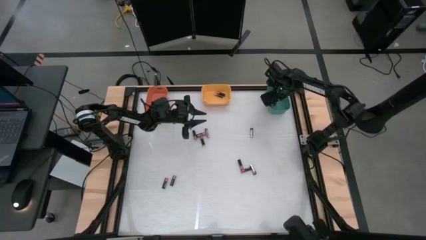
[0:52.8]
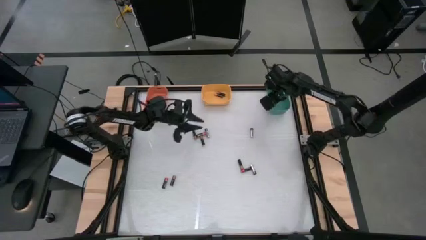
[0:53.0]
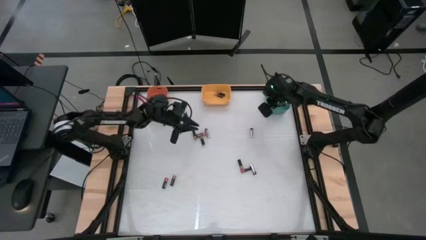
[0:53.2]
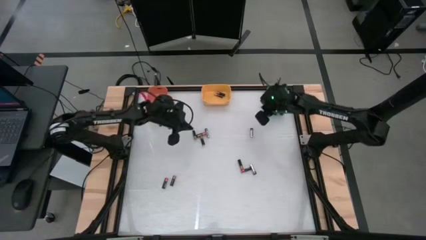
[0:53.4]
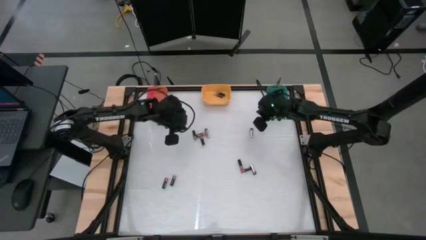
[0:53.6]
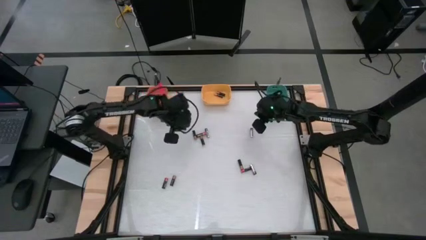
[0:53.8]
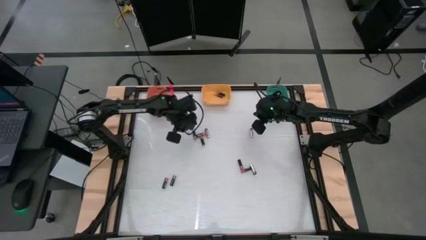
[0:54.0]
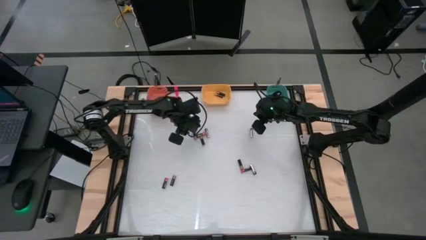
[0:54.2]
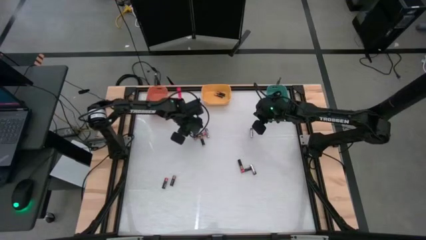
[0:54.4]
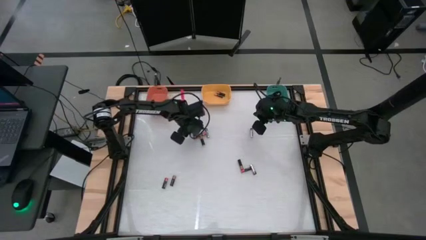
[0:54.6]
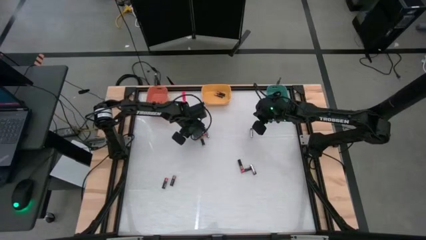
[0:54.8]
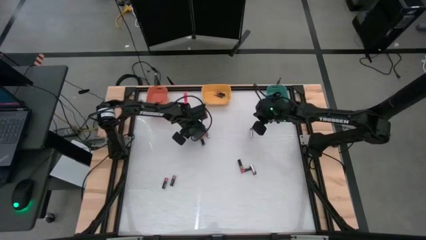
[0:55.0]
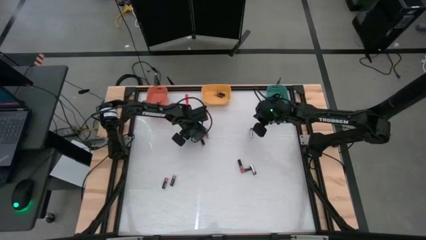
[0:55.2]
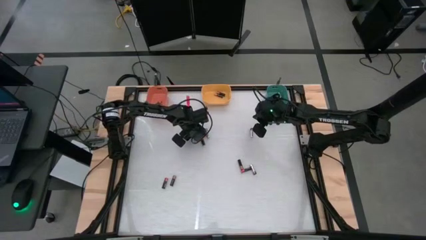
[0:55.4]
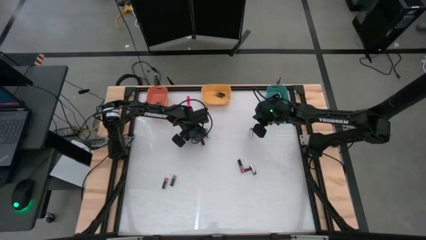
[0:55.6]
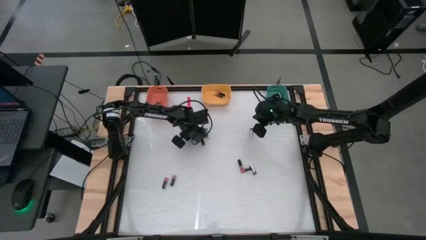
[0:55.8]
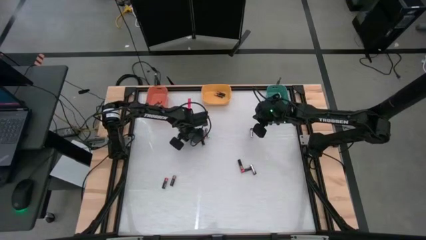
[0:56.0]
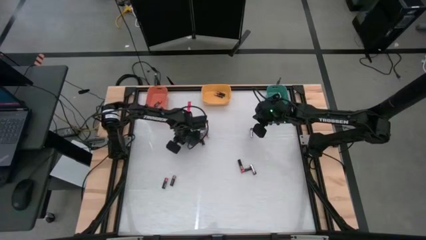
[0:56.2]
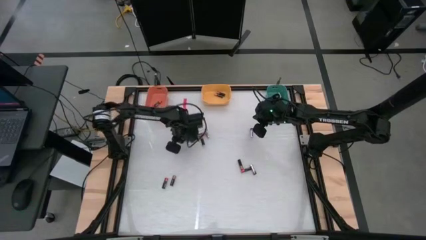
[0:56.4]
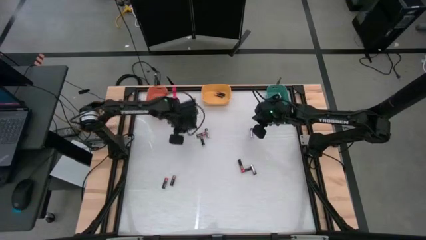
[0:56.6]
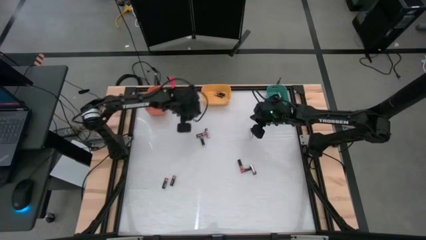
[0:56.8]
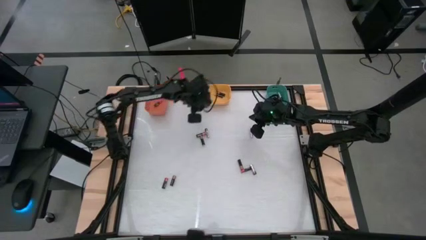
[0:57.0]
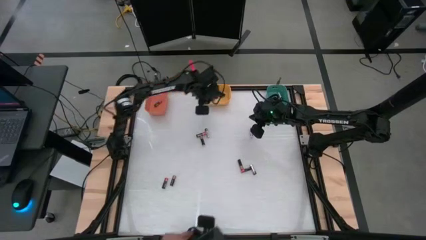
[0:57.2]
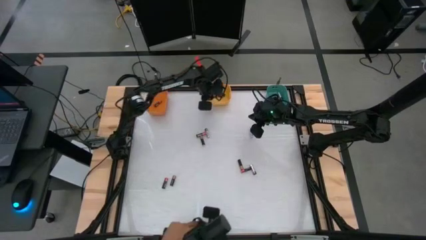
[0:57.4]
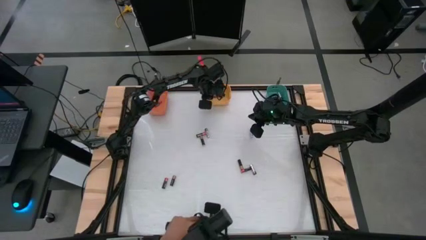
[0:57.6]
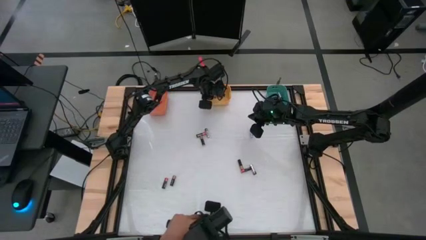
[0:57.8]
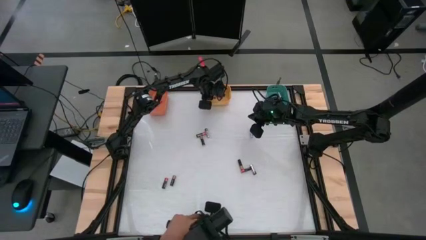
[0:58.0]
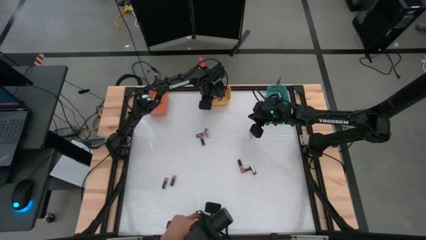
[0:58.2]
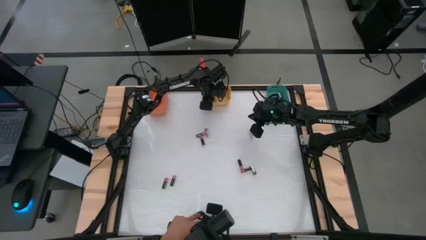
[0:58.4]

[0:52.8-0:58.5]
Task: Sort batteries
Put the gold battery into the yellow bin

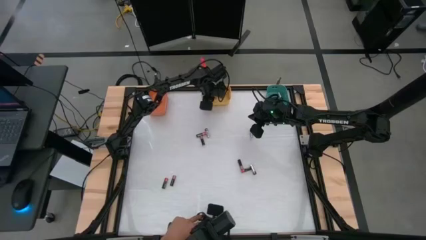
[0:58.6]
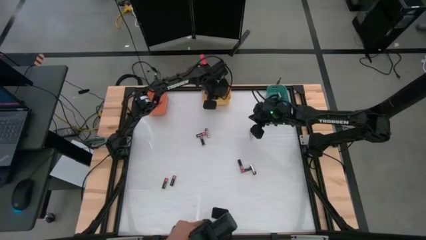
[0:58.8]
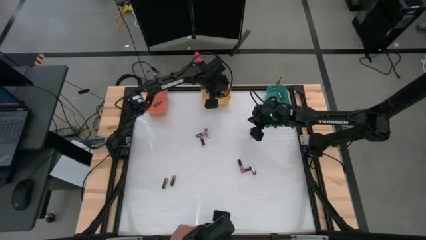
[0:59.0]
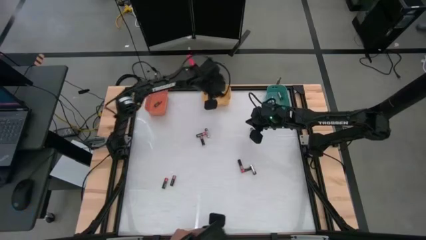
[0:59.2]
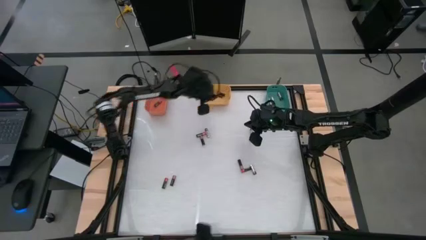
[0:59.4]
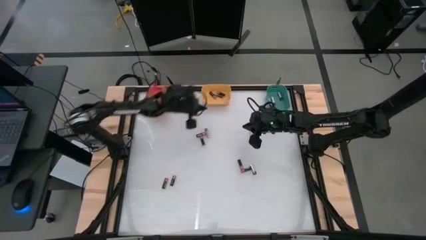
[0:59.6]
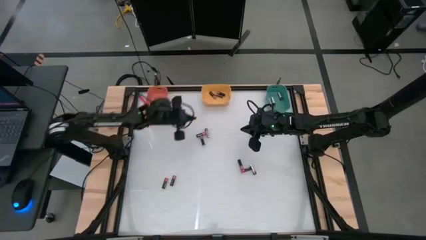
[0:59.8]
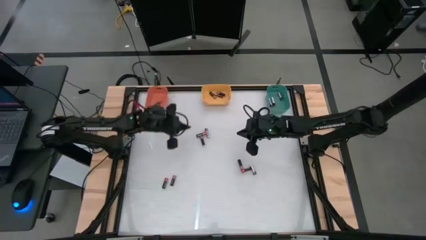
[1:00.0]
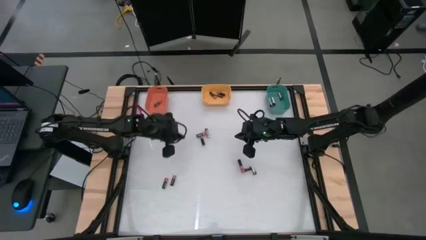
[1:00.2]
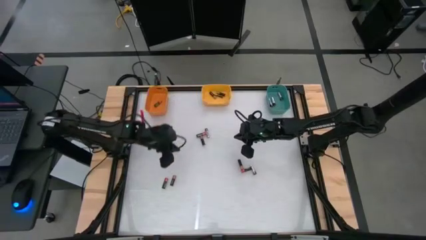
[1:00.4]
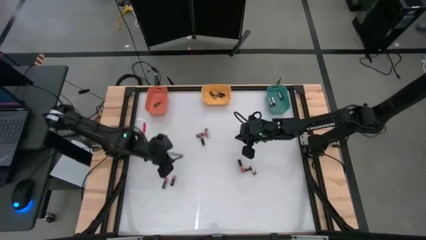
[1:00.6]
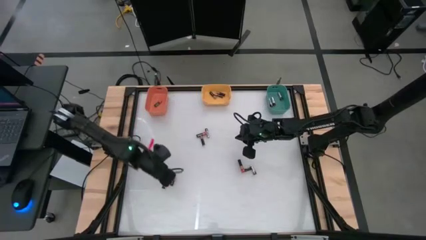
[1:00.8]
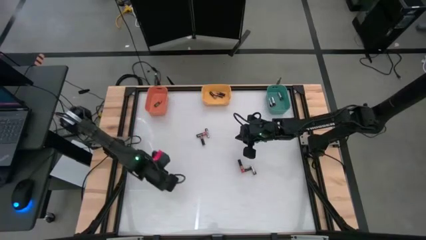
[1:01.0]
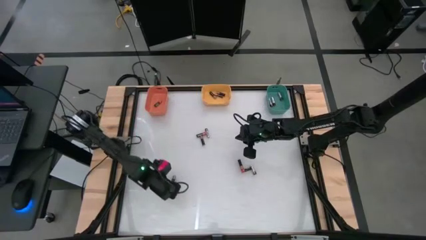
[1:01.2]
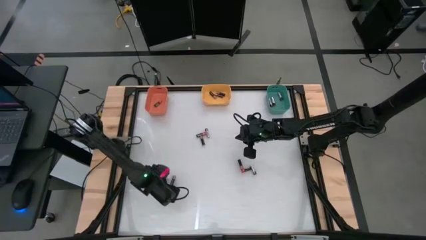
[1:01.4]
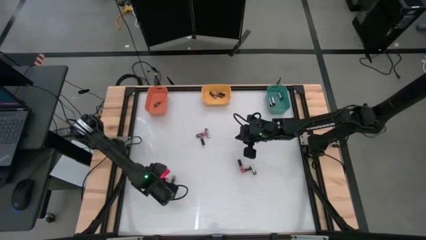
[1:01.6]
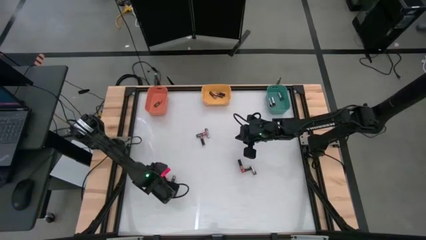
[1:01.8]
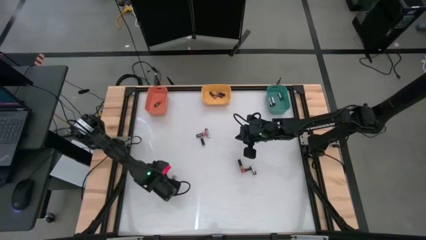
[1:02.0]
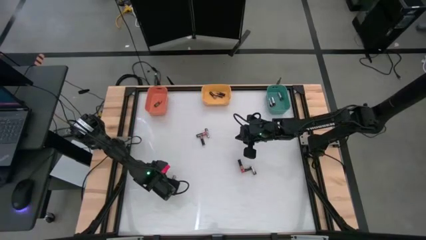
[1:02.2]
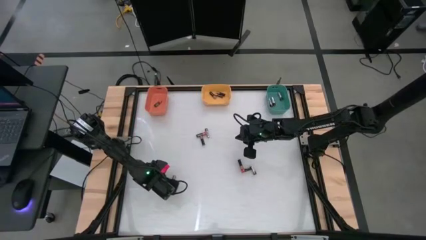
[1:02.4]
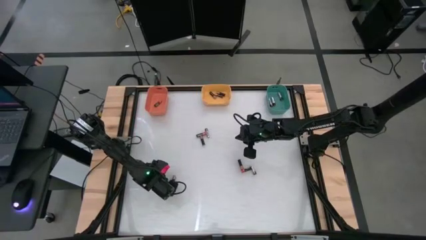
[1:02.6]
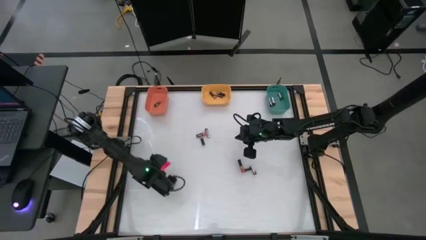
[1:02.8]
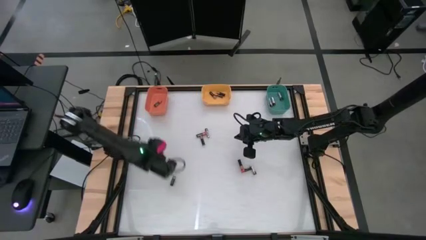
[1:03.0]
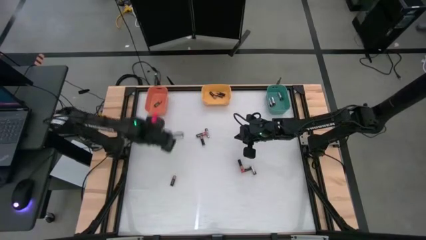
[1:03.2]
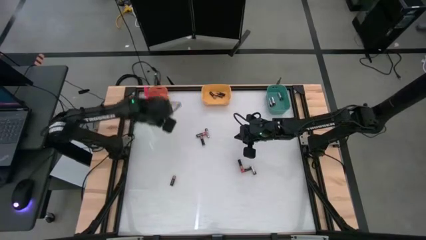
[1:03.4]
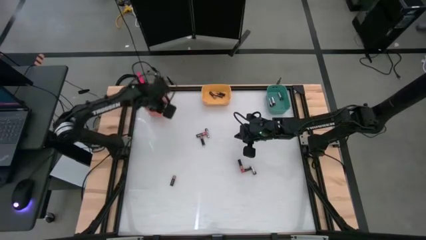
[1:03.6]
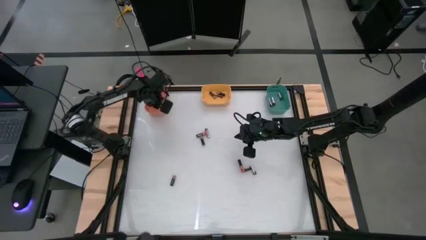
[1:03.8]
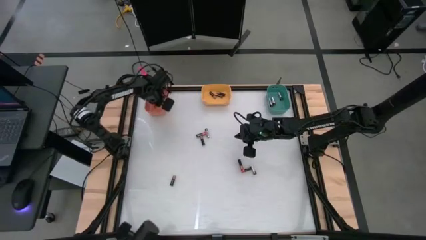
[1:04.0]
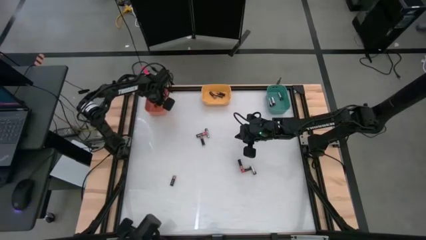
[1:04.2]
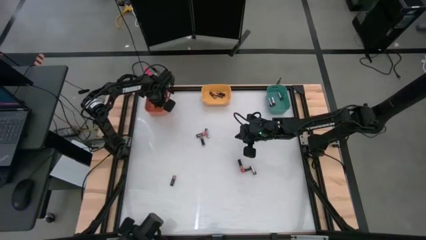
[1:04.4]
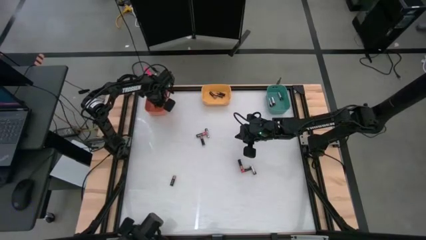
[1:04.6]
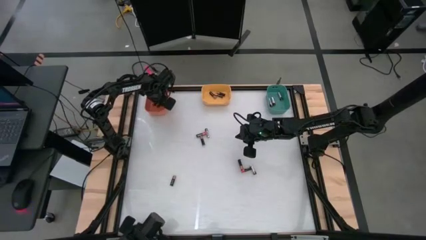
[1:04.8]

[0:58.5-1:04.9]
Put the red battery into the orange bin

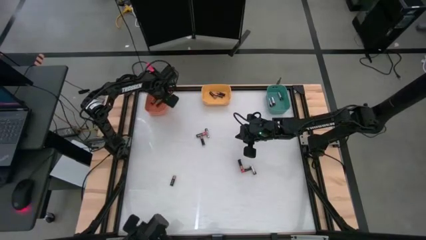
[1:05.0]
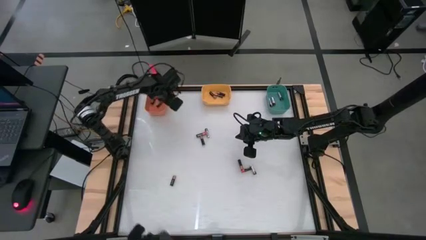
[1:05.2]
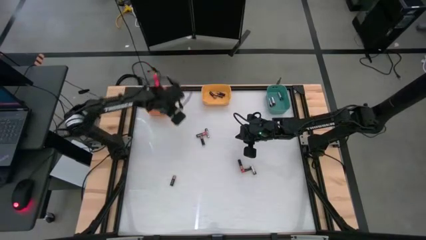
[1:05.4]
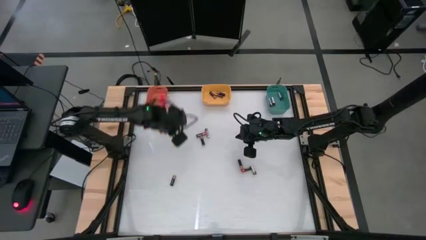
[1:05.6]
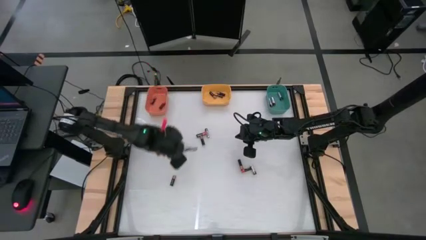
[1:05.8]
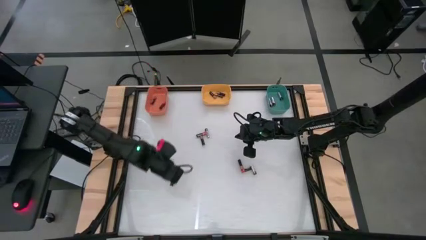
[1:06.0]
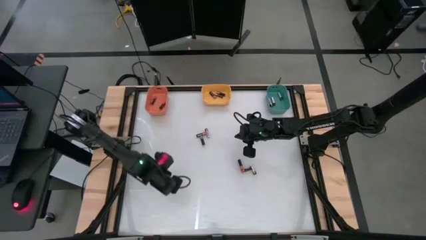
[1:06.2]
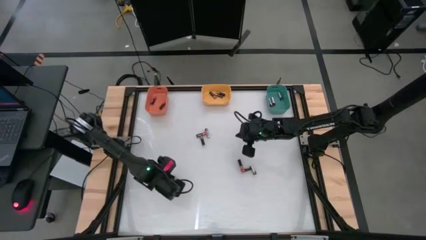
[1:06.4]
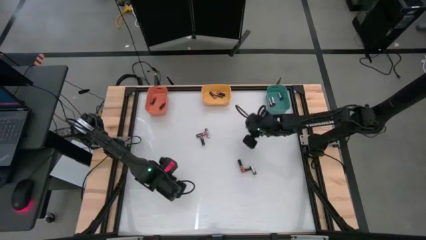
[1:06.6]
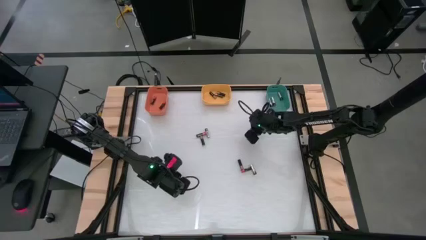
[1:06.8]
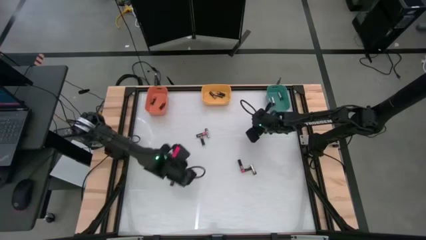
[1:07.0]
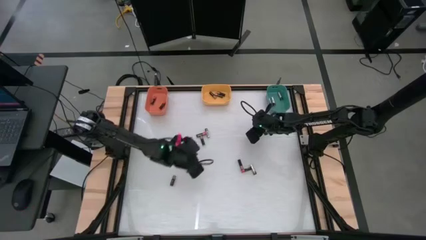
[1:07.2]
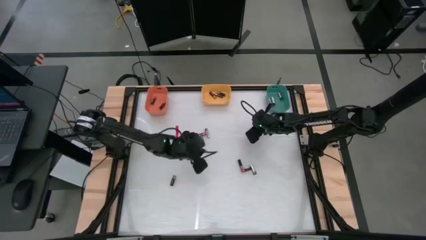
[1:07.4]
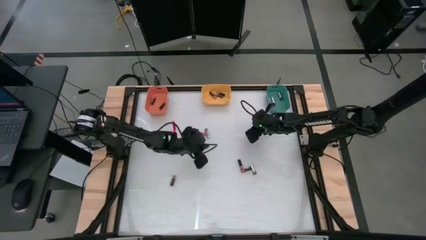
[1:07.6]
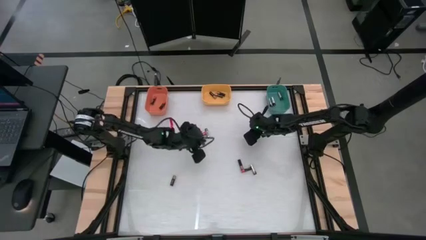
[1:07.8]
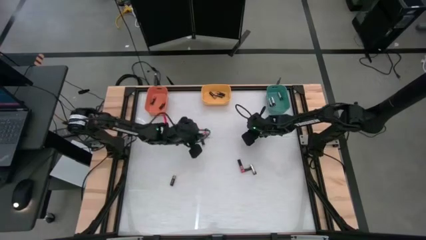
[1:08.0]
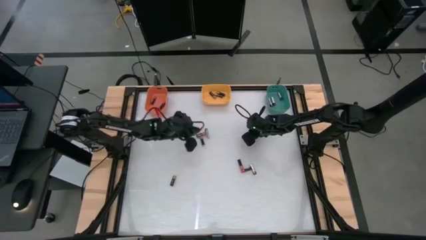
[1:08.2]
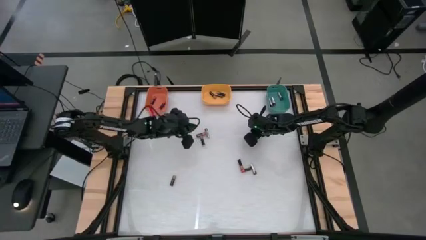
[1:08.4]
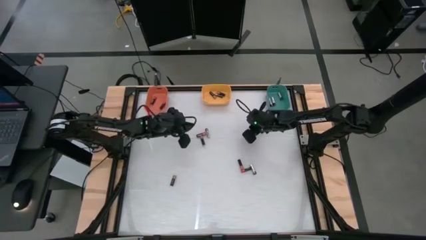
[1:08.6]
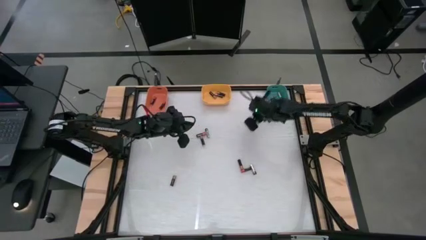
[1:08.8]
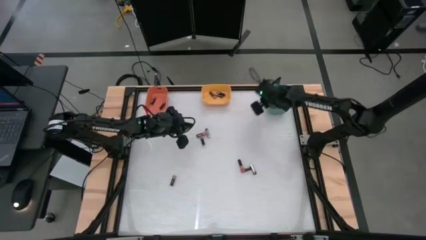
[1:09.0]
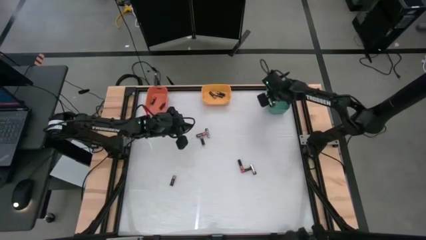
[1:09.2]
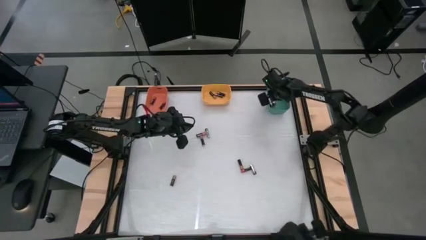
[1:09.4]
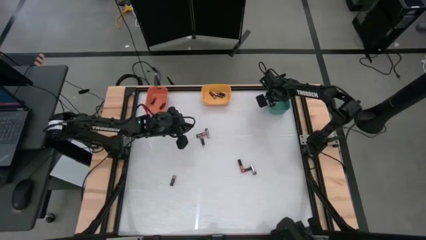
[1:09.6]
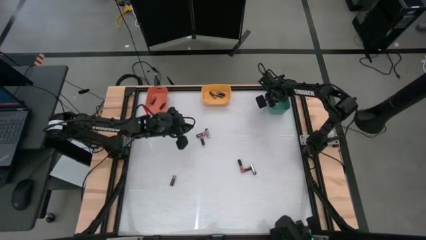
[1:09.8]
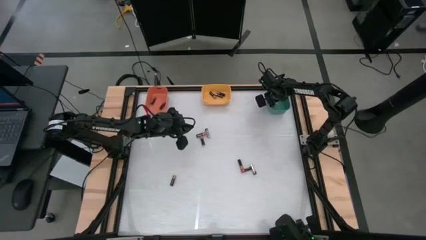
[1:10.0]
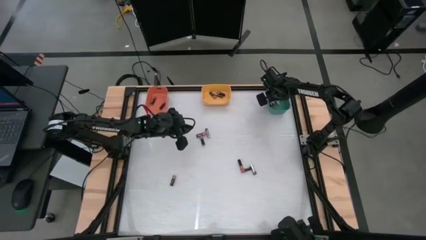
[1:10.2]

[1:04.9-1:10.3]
Put the black battery into the green bin
